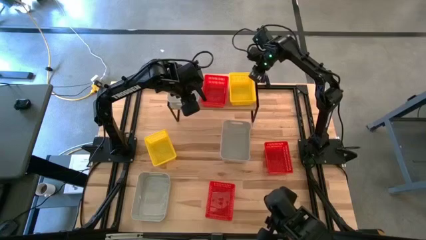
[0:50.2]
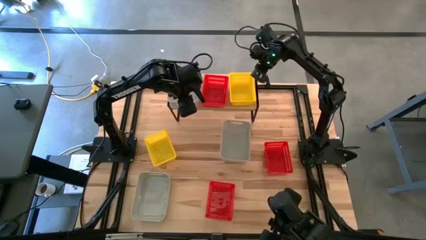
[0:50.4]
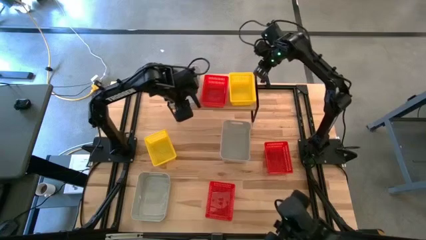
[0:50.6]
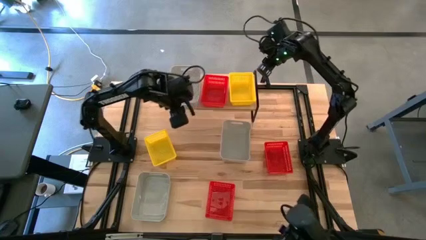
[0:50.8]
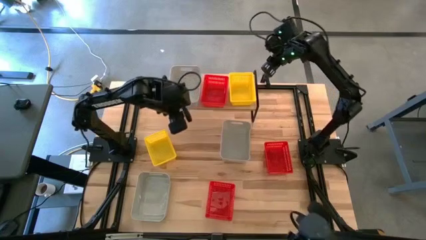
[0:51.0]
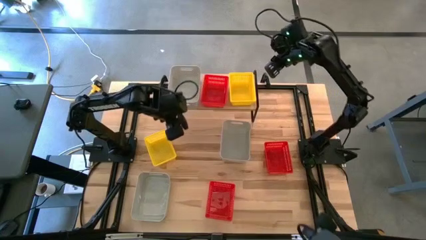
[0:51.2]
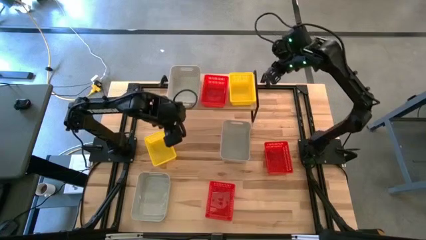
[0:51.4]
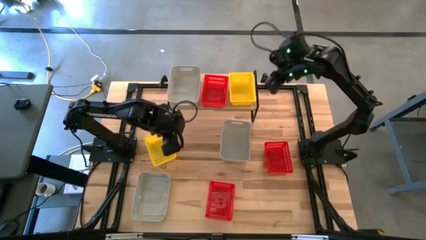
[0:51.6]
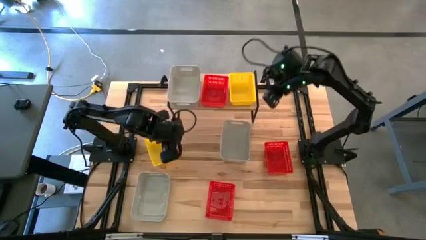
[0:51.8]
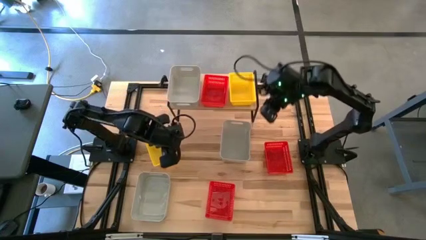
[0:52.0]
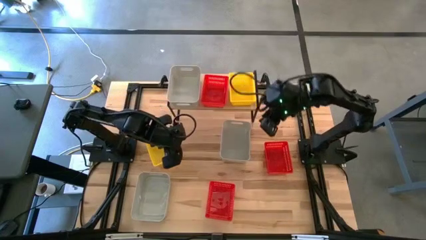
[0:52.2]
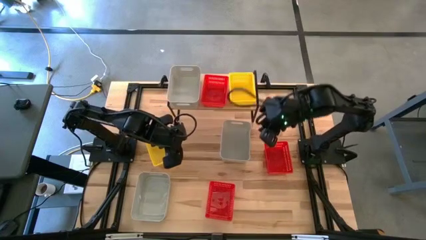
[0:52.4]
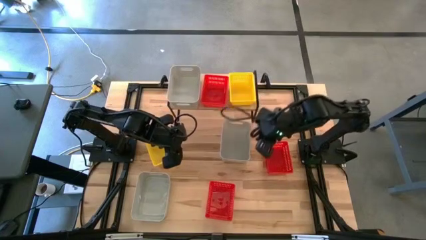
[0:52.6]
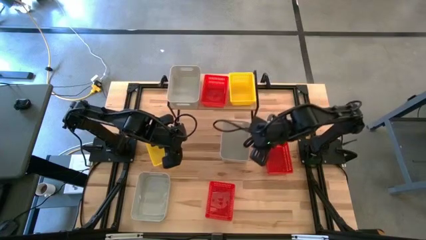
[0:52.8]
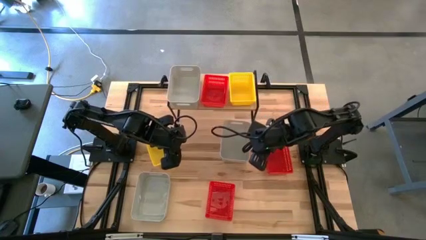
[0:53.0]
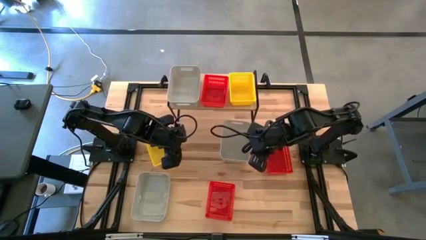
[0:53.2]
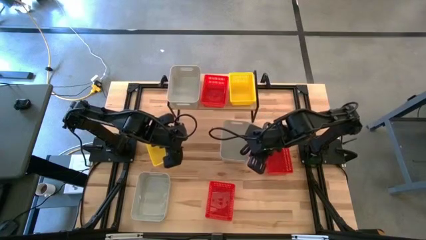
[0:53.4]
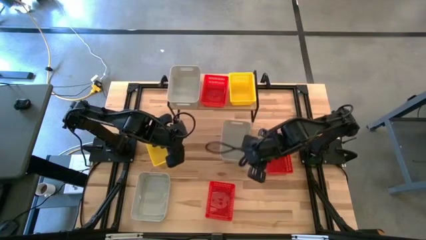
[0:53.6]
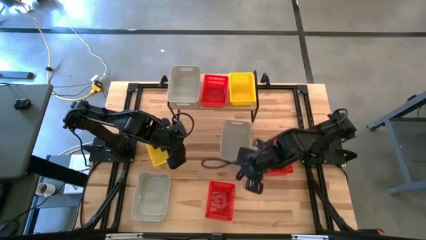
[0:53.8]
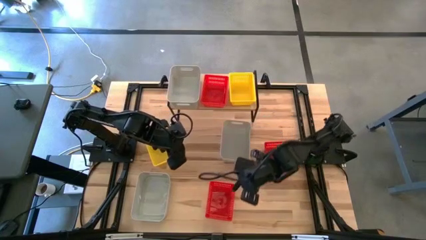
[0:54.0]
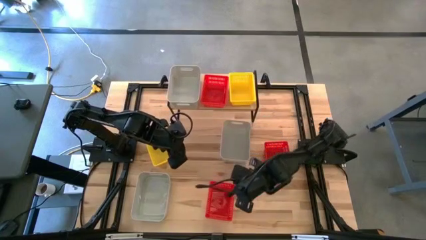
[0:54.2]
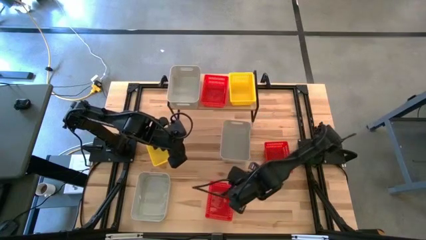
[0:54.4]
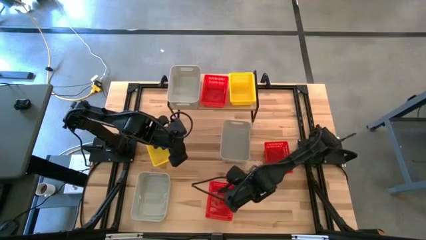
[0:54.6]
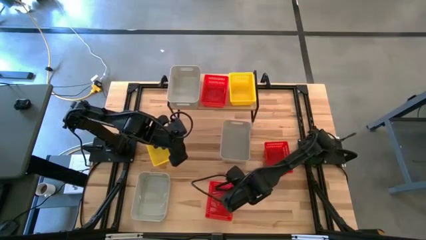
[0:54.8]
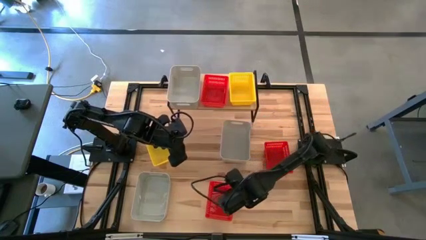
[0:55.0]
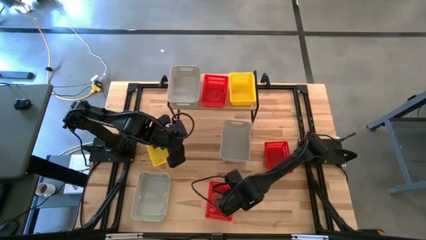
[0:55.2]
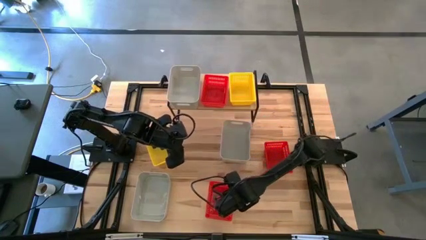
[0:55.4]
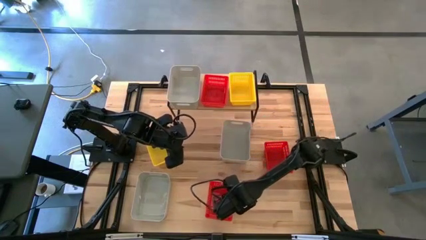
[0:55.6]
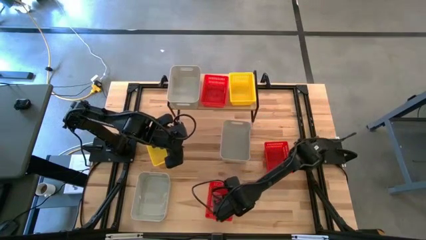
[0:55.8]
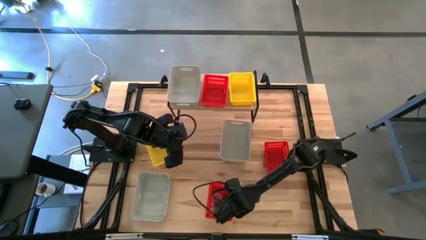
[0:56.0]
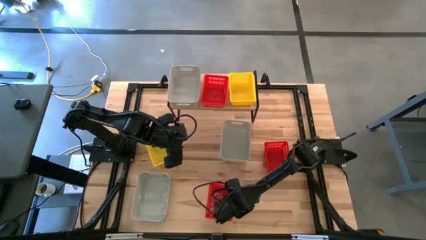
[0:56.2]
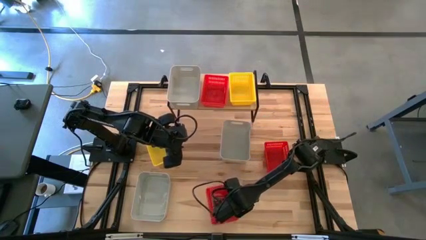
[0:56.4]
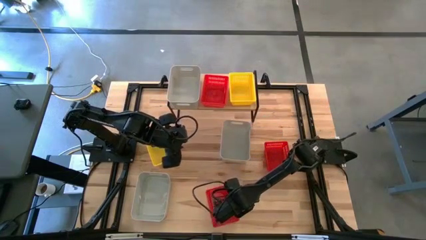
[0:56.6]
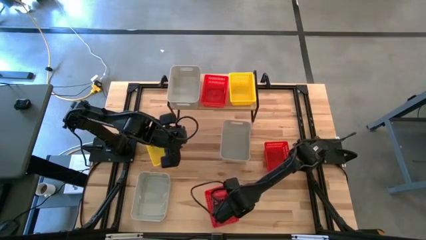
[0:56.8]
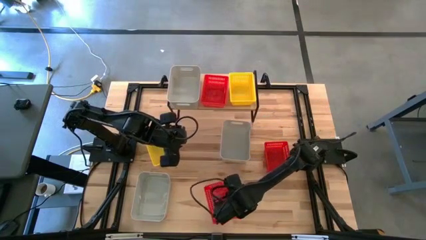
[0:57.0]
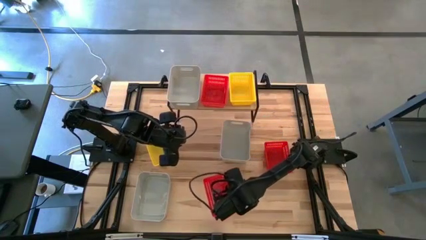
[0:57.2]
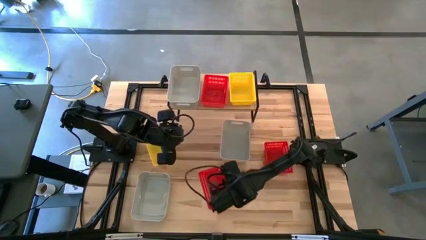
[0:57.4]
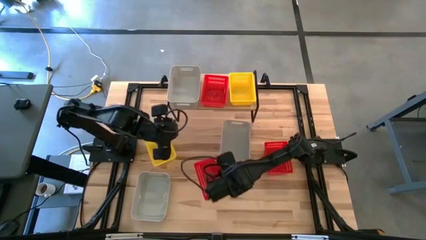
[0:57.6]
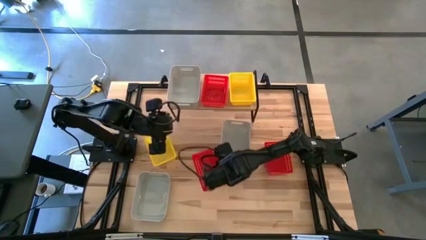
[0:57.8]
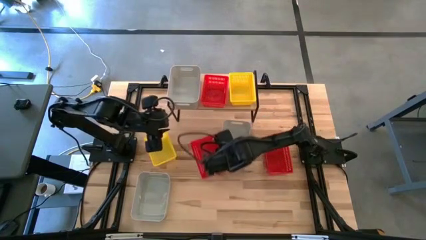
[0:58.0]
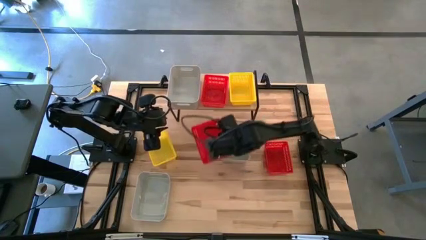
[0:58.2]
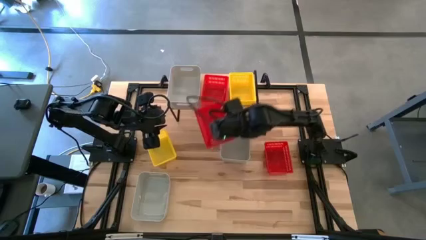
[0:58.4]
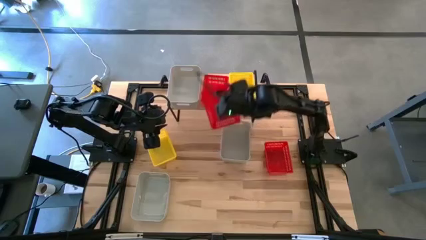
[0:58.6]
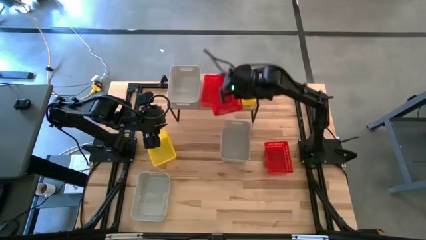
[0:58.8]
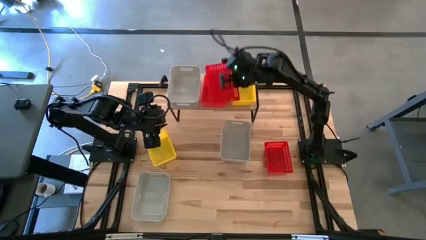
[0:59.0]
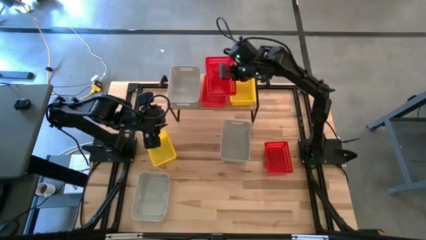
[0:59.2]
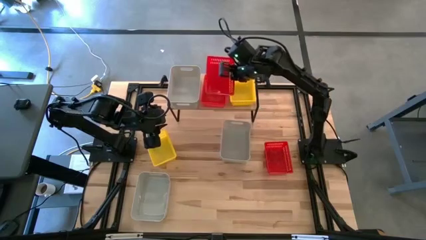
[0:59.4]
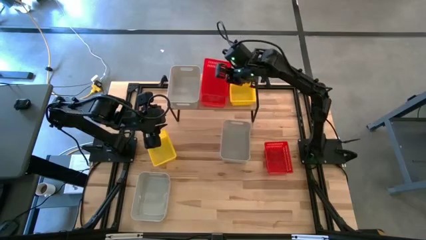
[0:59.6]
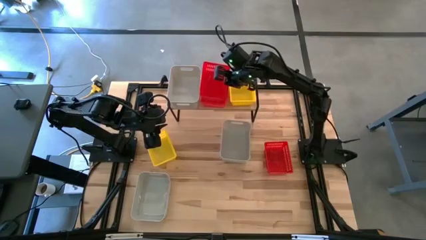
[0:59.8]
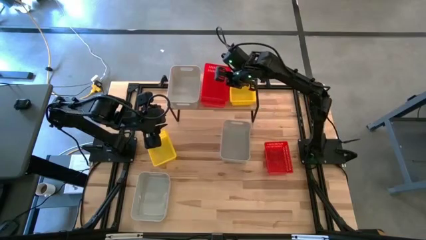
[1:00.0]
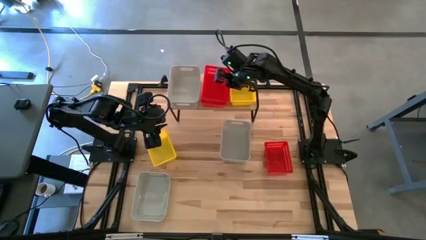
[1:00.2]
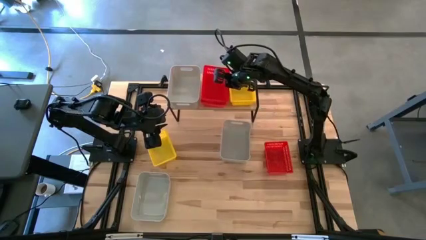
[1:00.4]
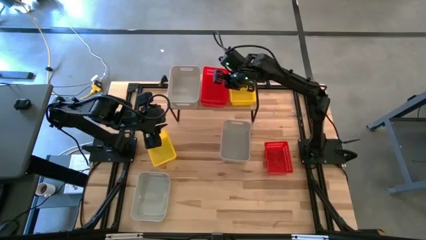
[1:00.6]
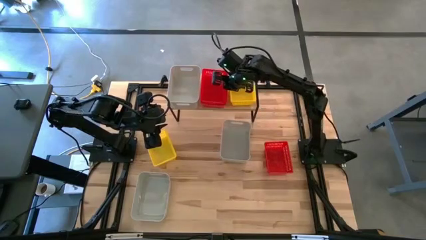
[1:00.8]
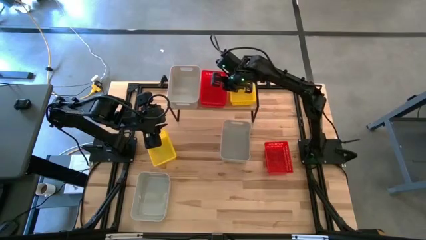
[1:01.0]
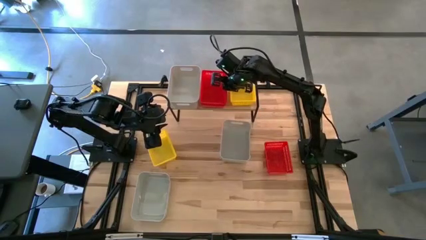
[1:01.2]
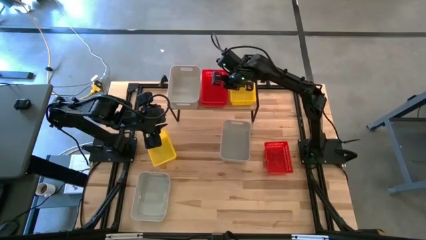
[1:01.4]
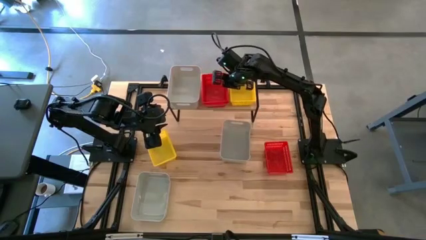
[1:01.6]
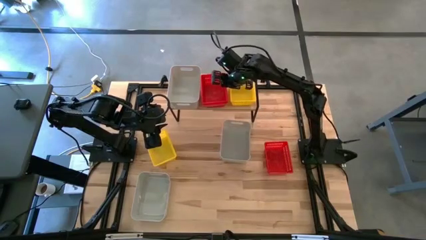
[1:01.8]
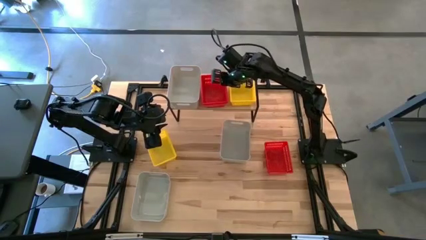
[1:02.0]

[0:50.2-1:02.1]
Task: Stack baskets on shelf by color
Stack the bottom red bin on top of the red bin on the shelf

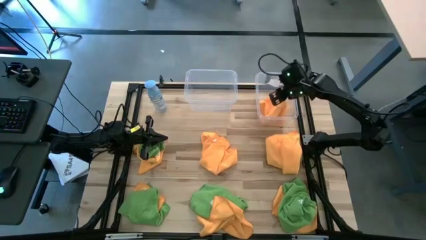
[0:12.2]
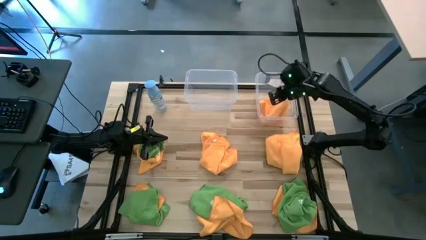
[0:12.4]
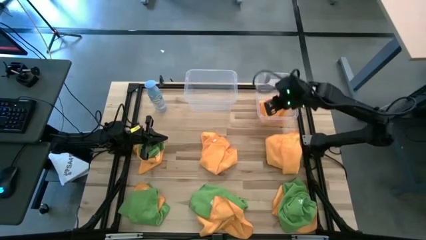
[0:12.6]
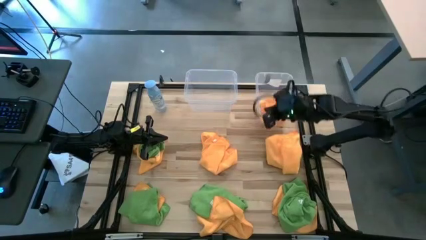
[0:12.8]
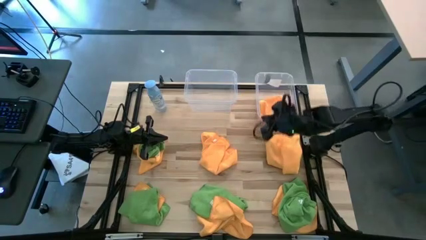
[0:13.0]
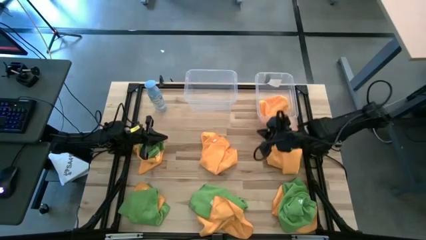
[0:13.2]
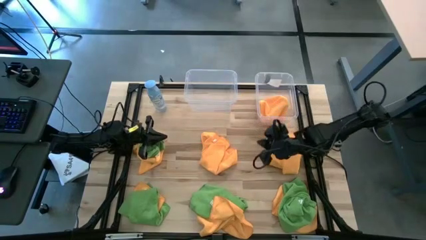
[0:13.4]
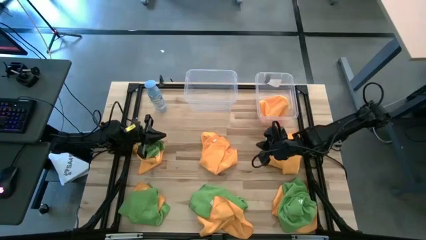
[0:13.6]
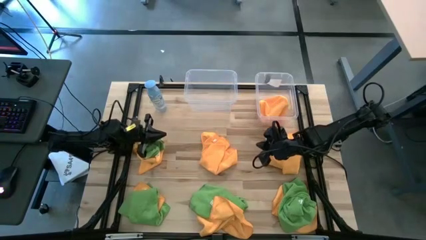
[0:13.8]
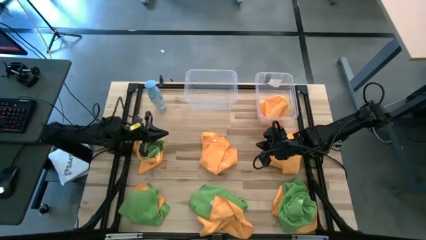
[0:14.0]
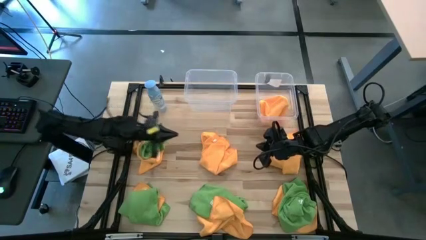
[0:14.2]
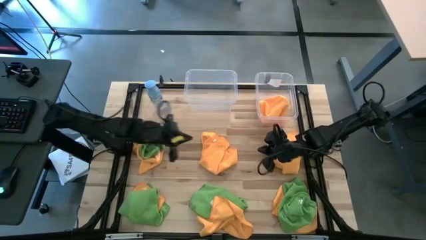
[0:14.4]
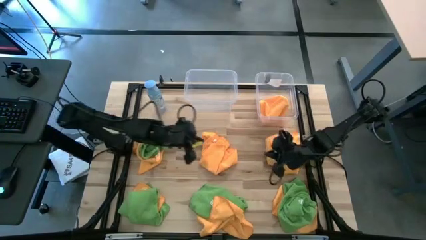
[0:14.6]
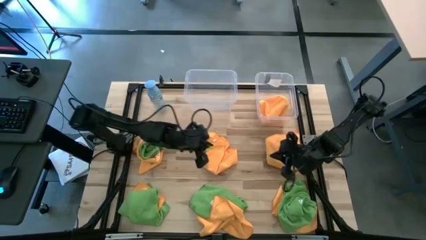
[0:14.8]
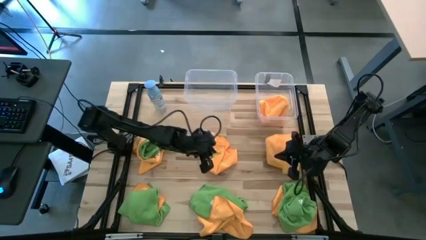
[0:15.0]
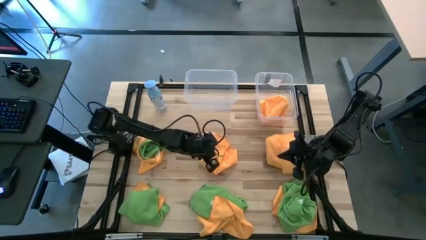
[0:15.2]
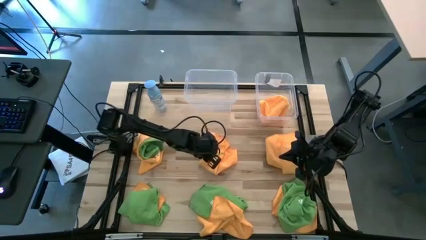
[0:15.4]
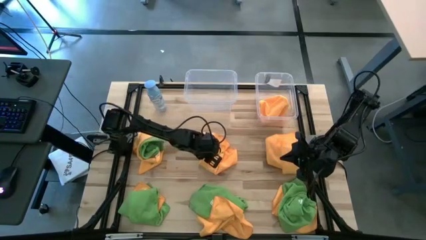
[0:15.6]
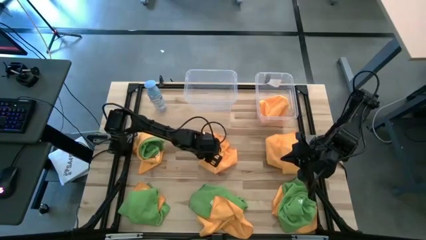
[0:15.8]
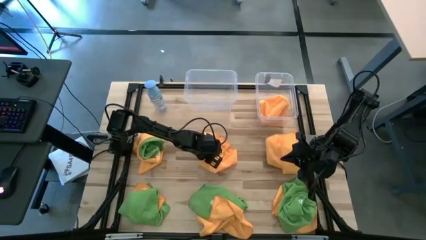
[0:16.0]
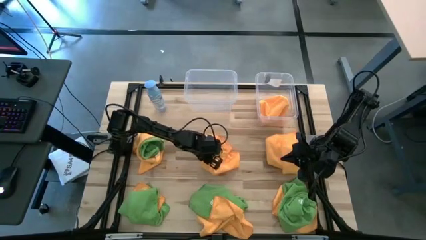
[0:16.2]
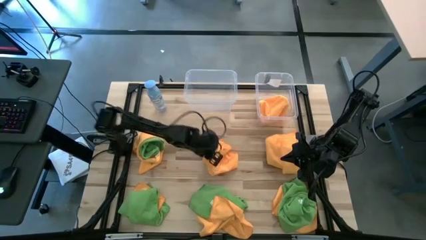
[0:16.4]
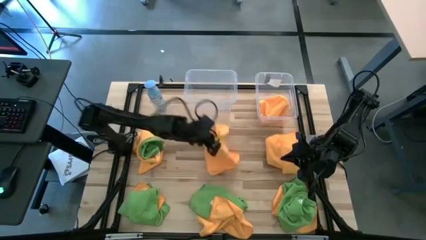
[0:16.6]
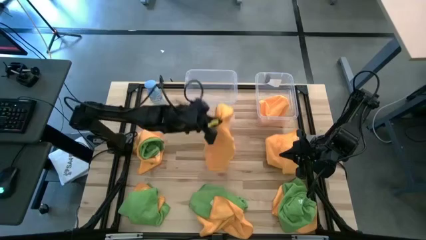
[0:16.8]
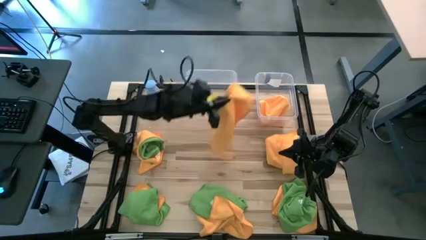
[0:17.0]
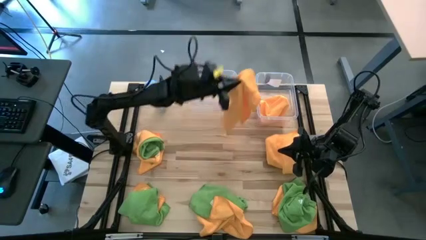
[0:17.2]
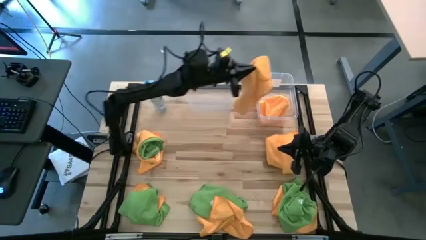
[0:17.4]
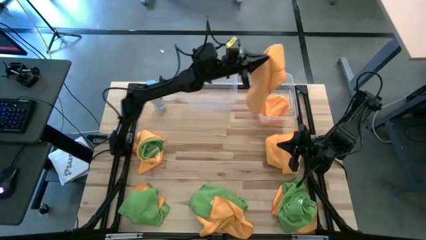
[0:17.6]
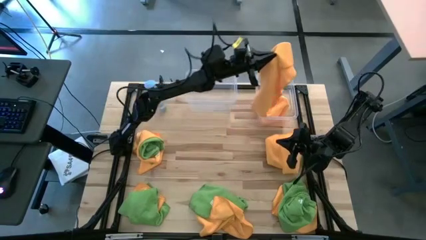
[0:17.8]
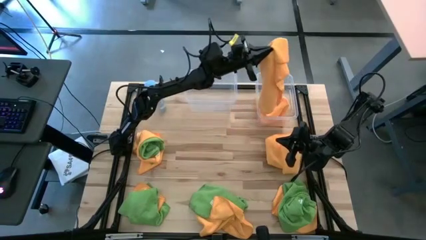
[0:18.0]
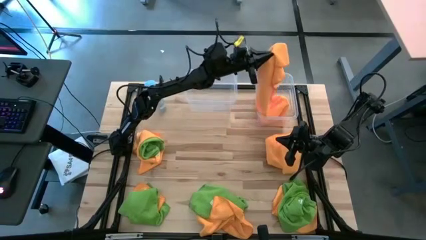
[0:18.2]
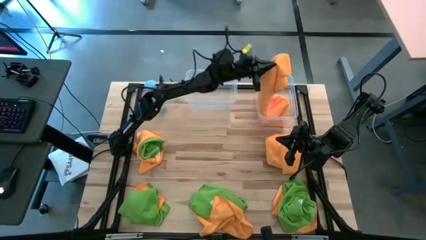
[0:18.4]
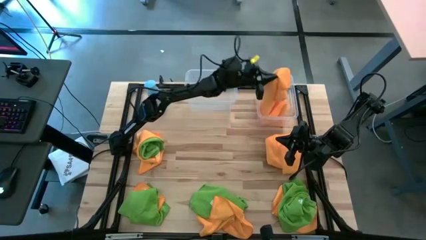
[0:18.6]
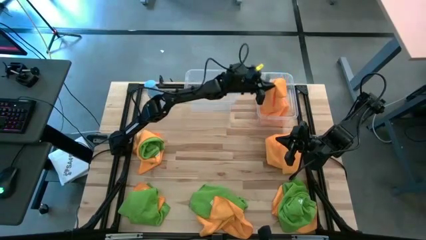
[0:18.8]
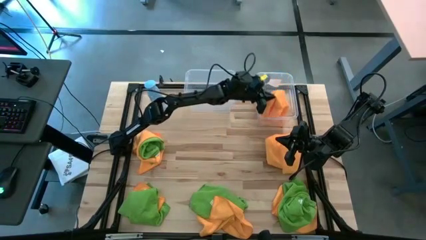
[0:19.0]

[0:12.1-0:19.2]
Task: Sort microfiber towel by color & place in baskets
Put the yellow towel into the right transparent bin
